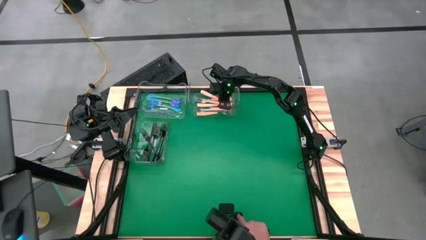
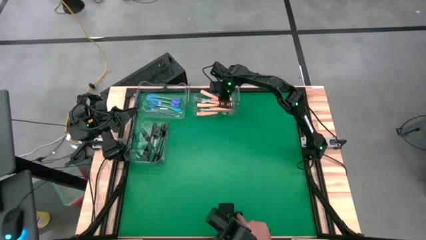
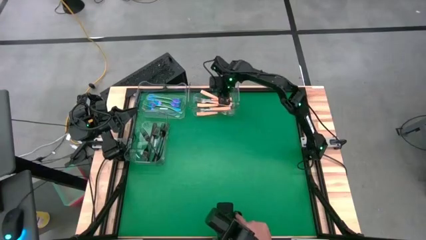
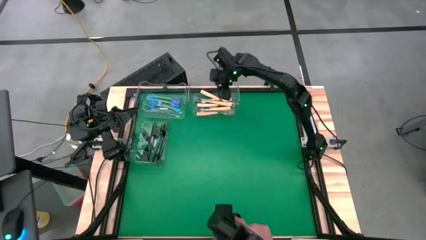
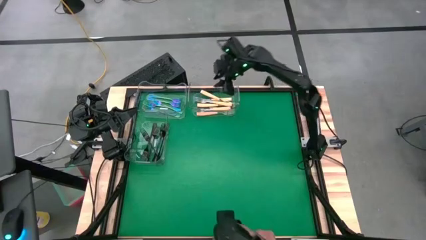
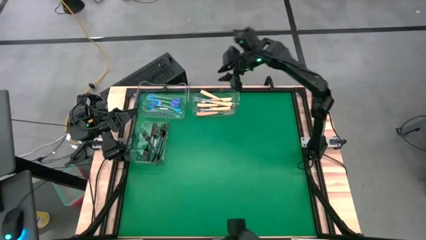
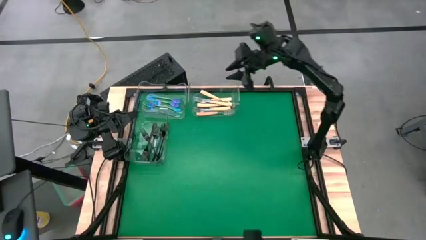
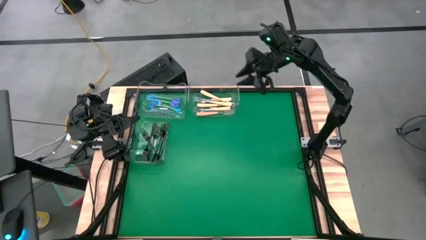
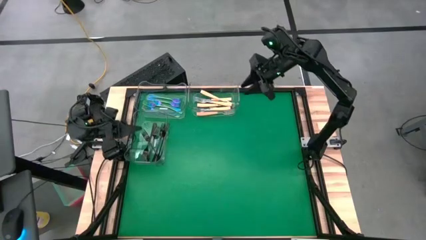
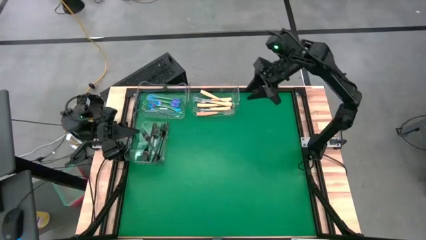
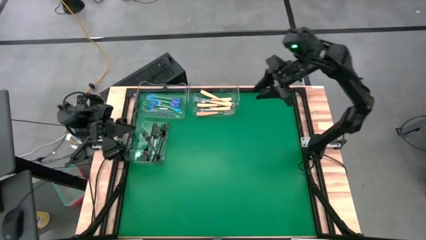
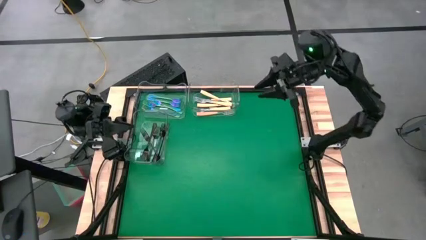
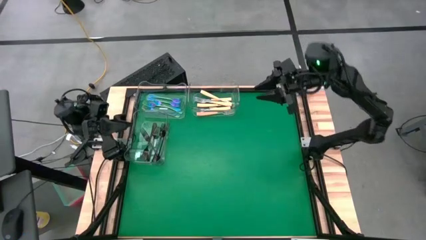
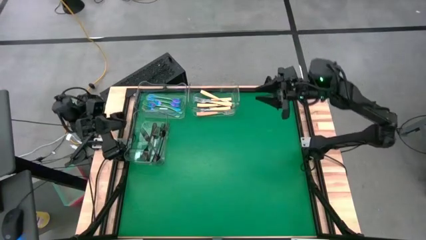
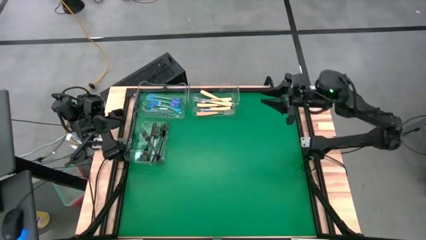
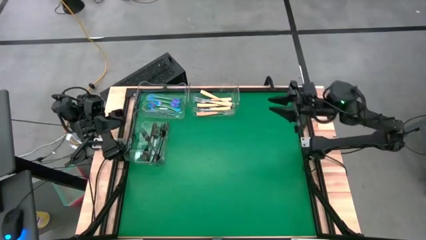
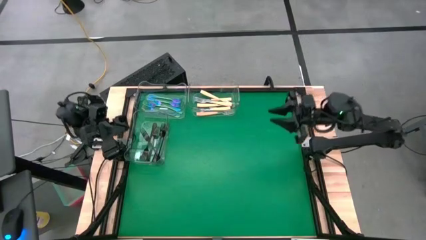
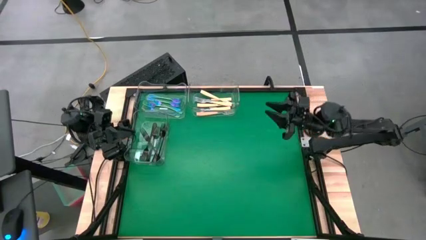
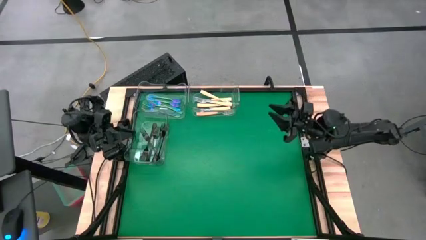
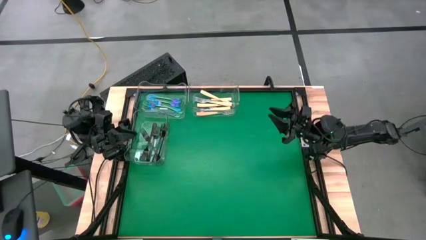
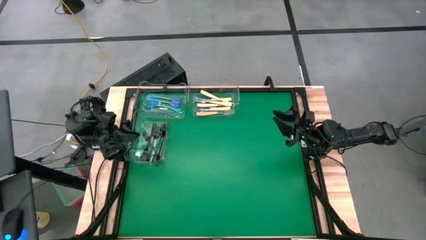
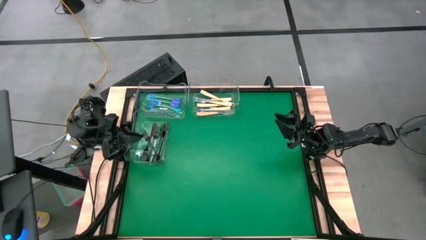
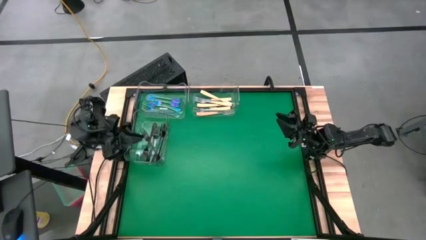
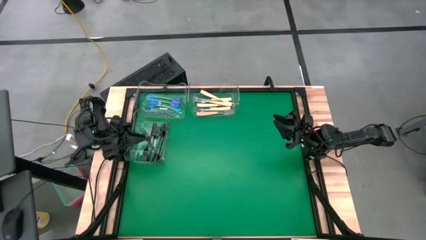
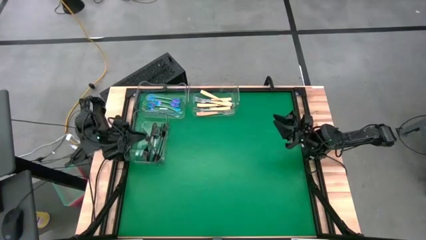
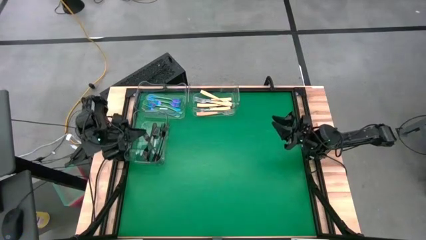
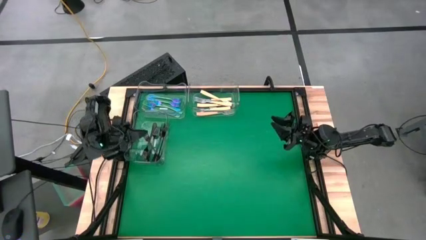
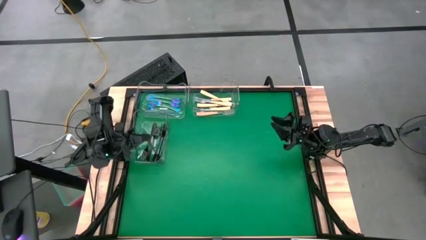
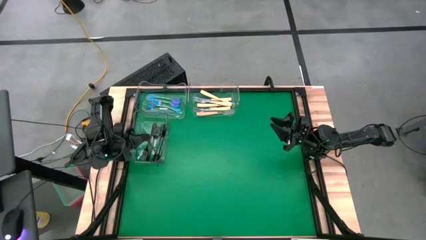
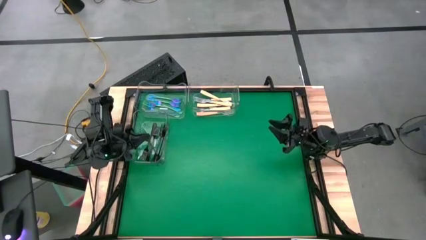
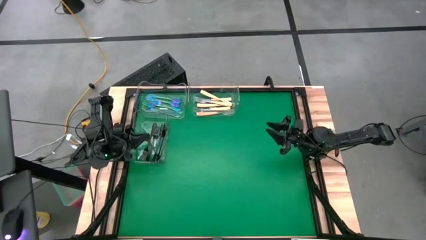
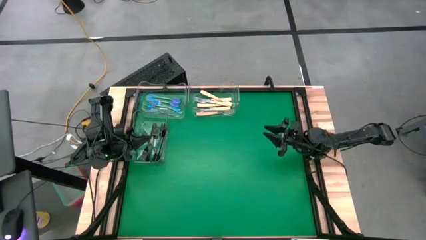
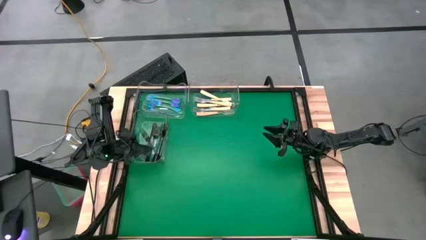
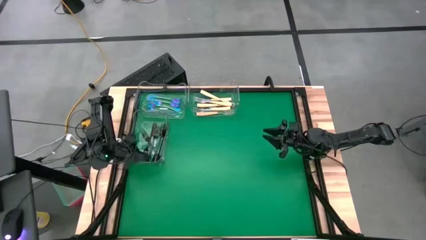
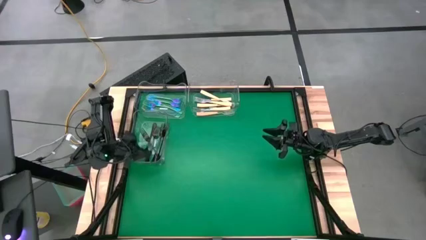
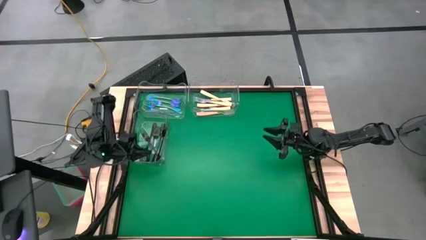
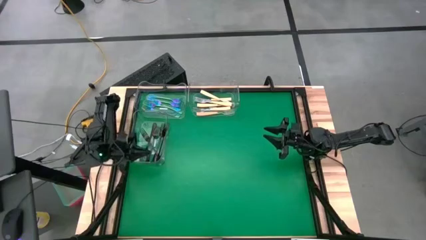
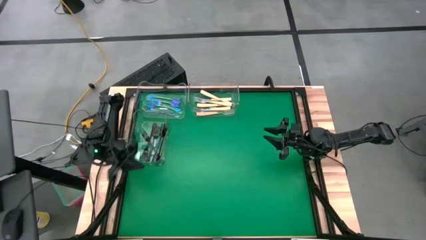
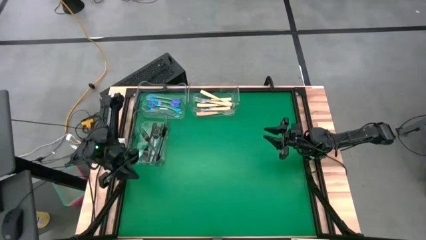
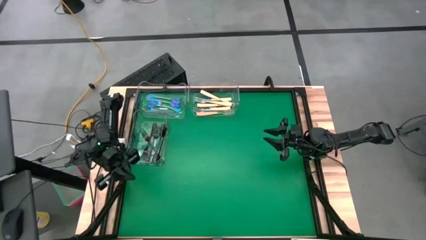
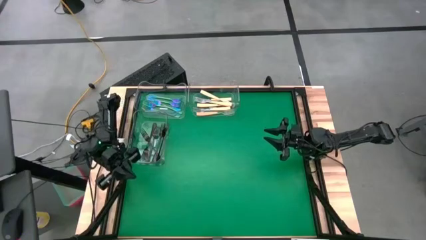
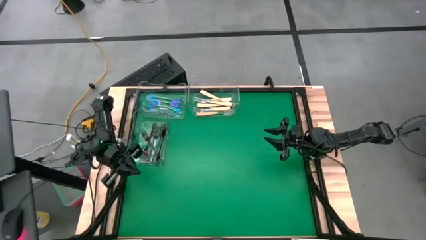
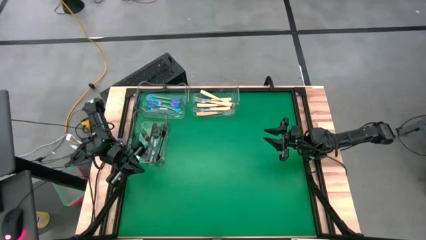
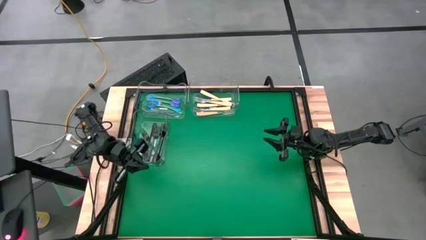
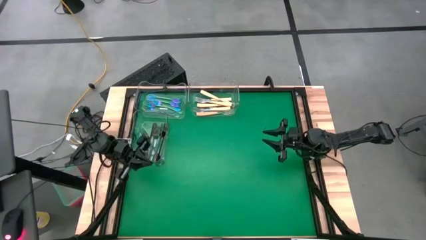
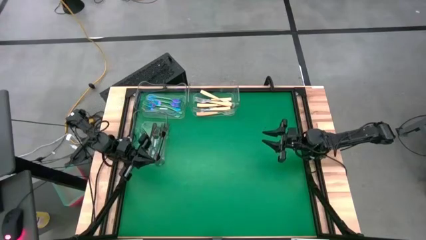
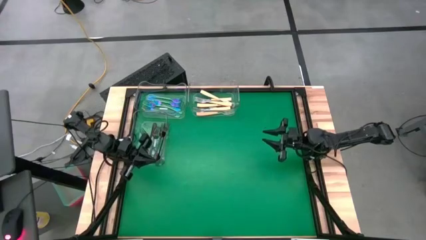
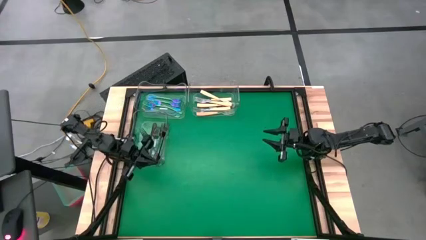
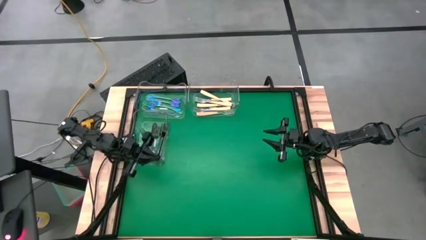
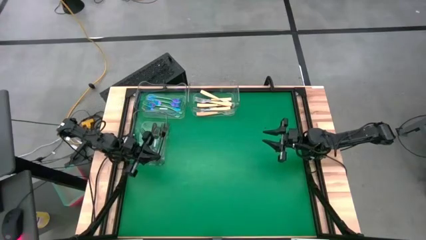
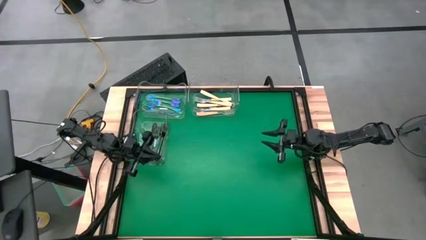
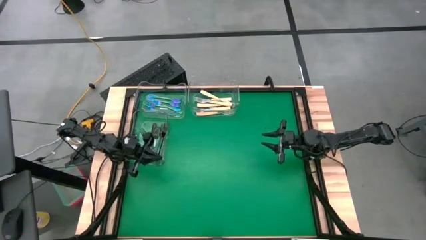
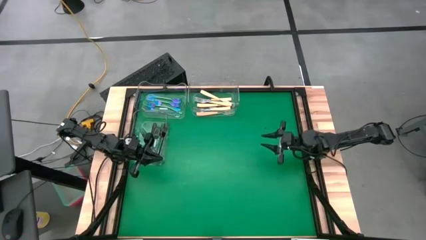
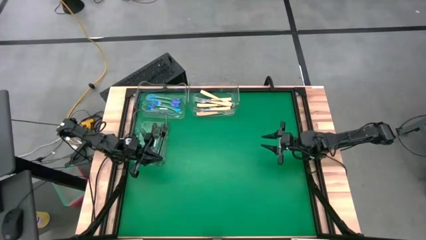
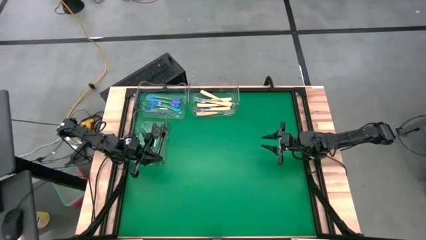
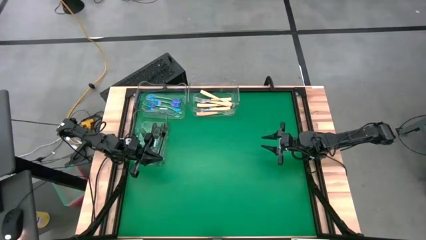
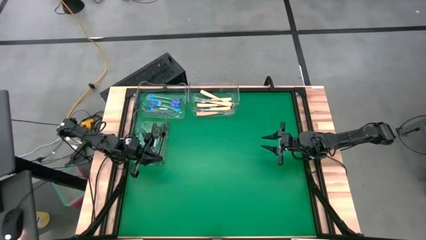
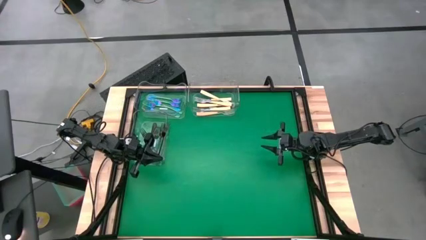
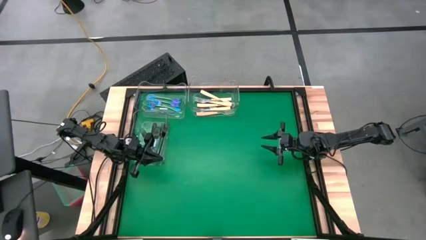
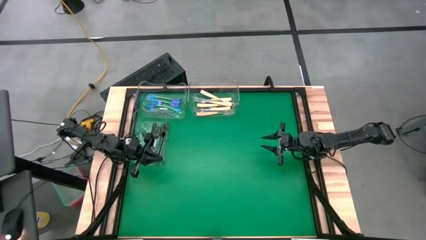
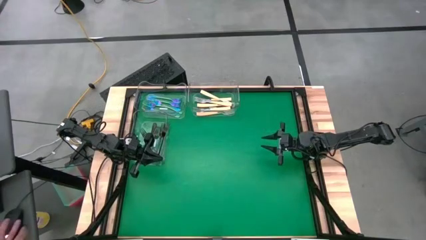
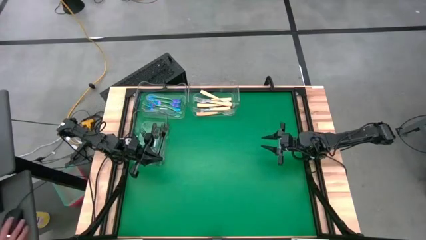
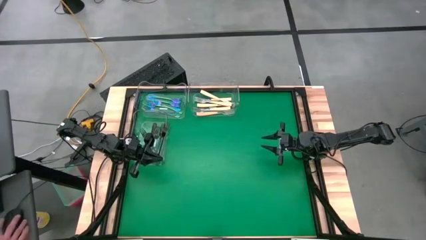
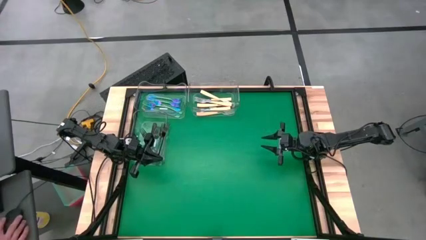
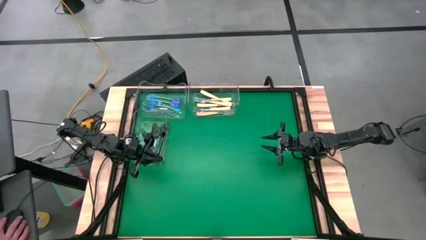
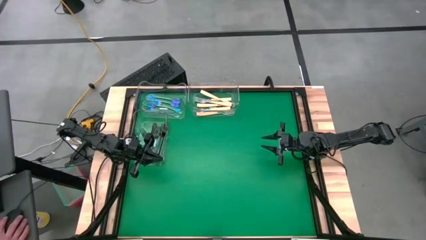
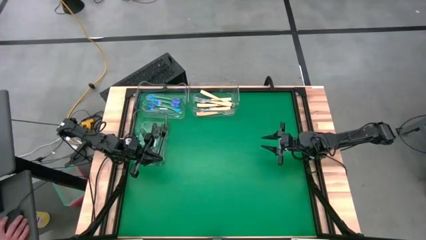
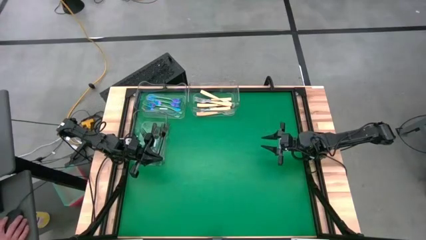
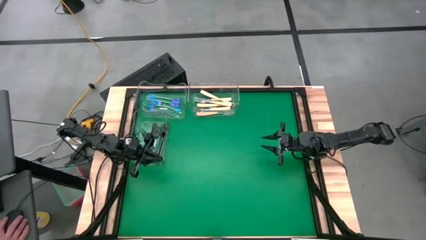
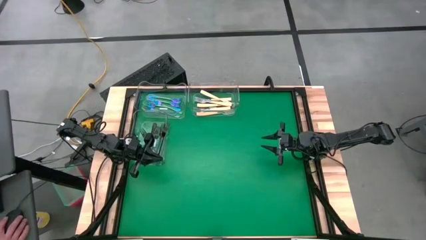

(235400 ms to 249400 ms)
Task: Sort silverware by color (type)
Return to Home Position
